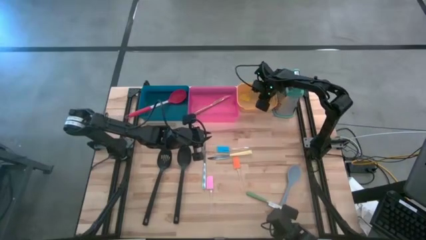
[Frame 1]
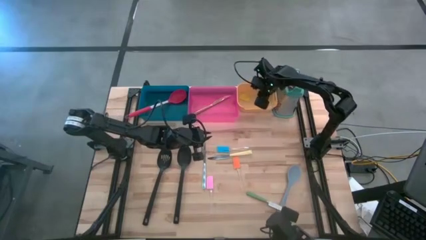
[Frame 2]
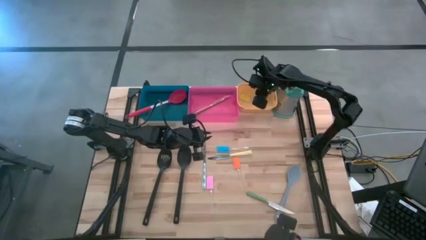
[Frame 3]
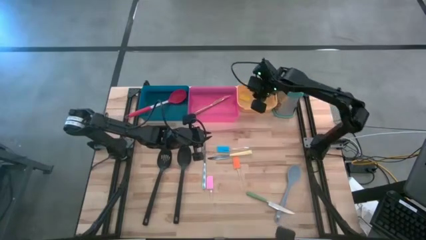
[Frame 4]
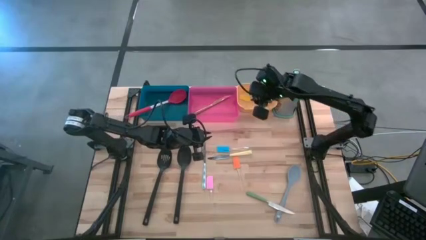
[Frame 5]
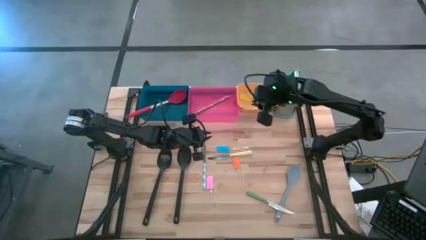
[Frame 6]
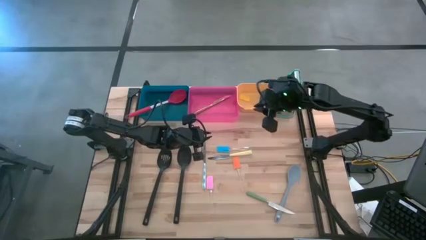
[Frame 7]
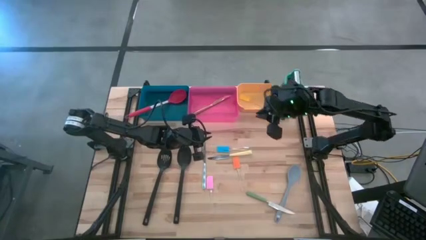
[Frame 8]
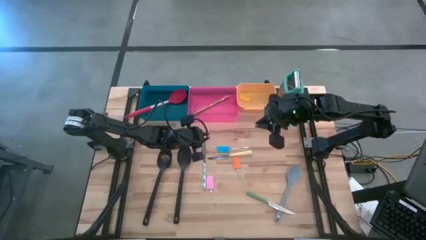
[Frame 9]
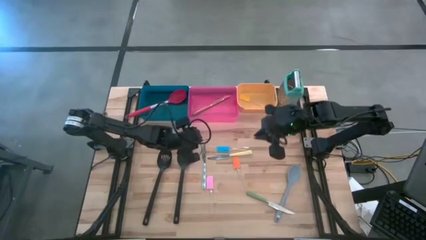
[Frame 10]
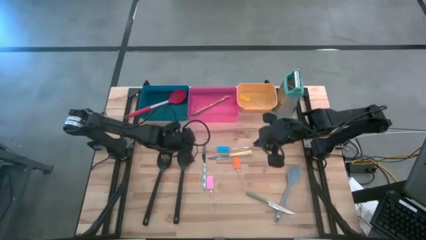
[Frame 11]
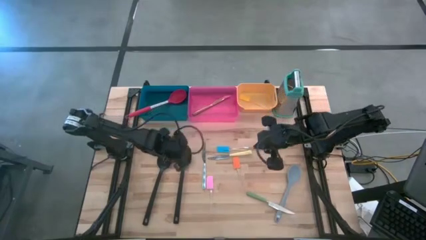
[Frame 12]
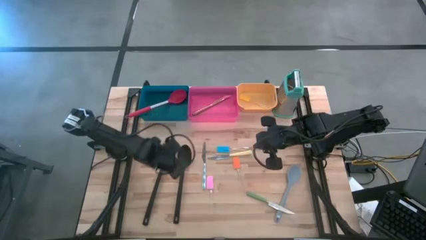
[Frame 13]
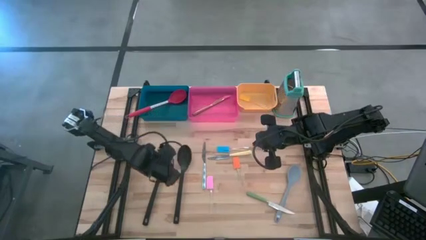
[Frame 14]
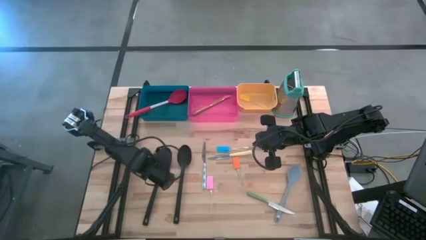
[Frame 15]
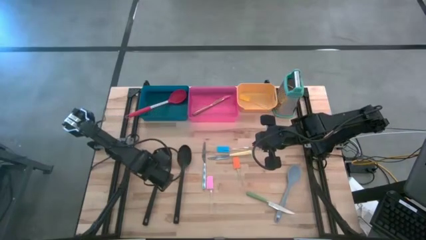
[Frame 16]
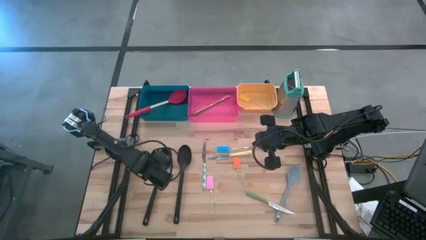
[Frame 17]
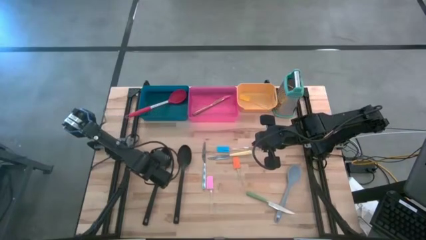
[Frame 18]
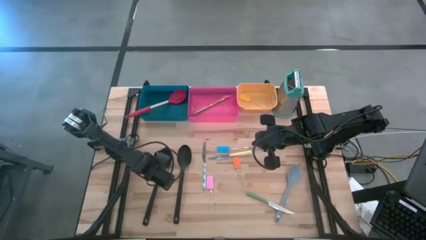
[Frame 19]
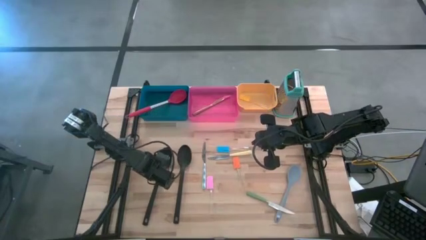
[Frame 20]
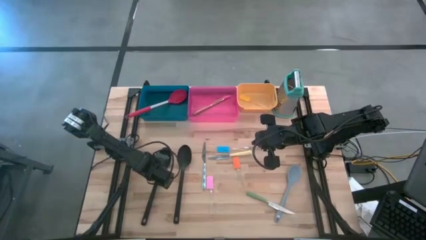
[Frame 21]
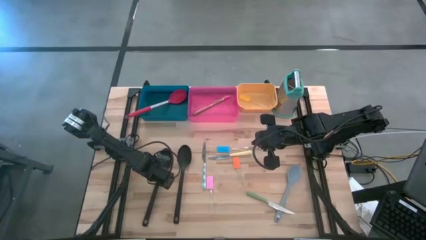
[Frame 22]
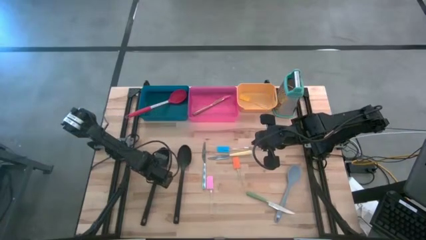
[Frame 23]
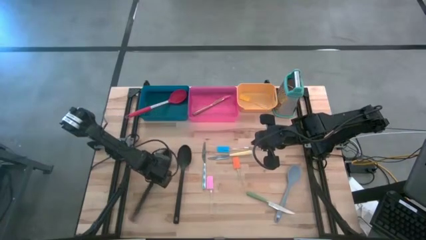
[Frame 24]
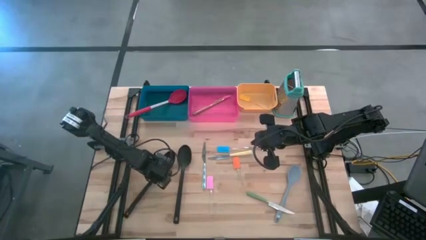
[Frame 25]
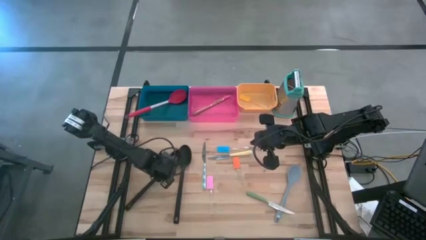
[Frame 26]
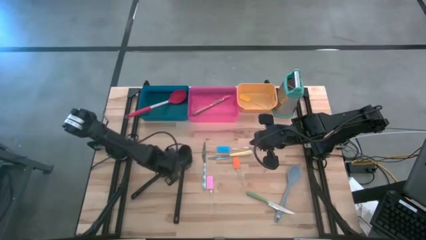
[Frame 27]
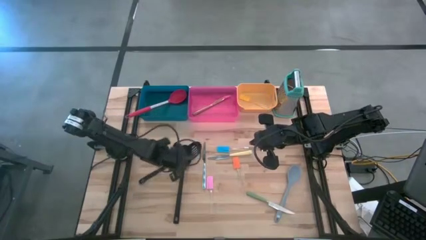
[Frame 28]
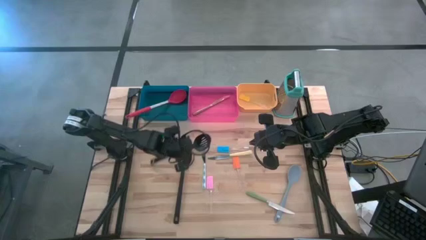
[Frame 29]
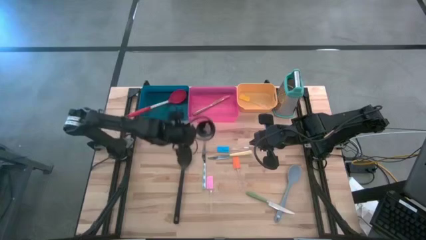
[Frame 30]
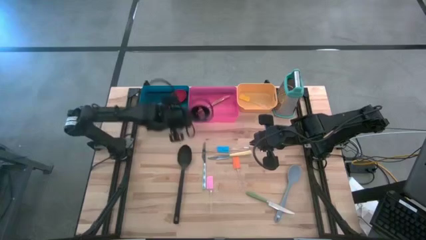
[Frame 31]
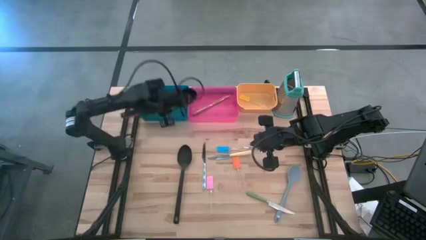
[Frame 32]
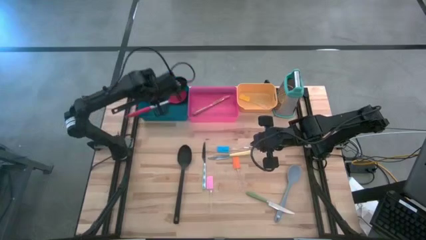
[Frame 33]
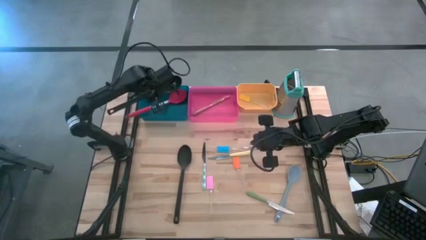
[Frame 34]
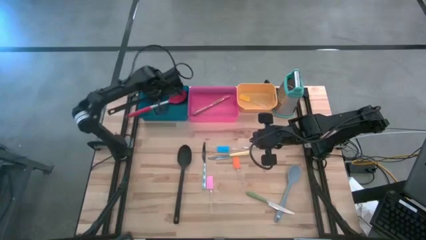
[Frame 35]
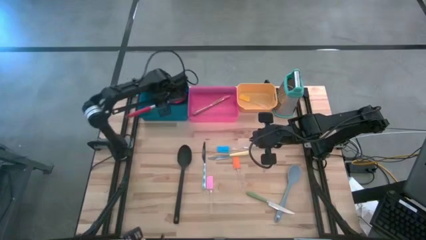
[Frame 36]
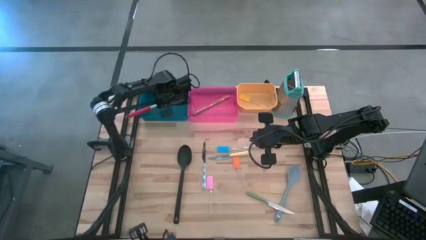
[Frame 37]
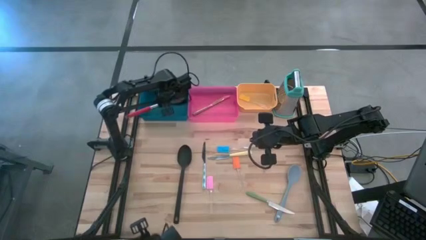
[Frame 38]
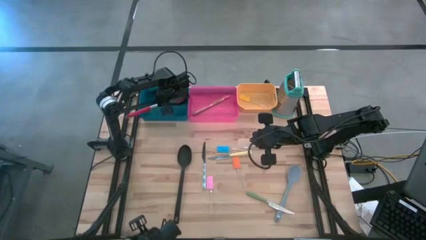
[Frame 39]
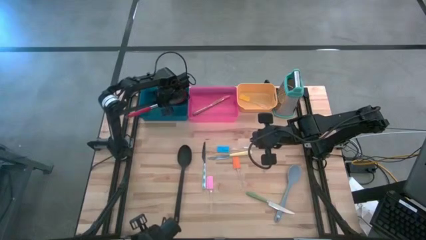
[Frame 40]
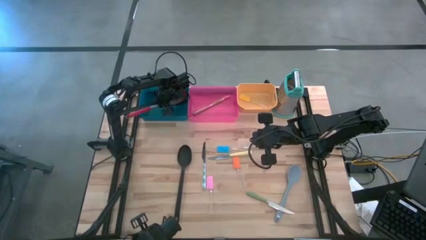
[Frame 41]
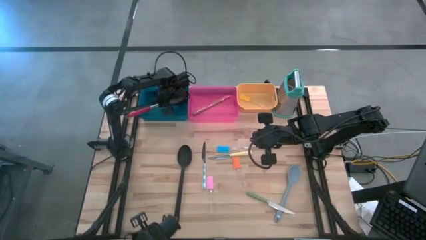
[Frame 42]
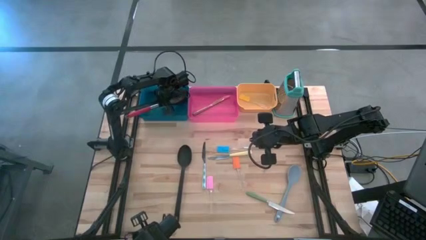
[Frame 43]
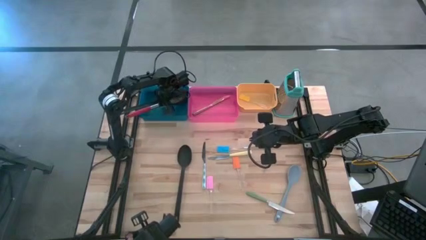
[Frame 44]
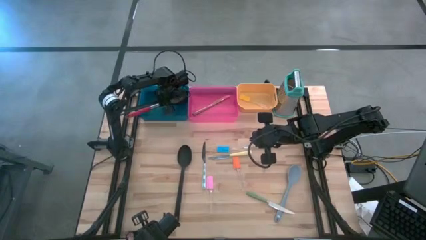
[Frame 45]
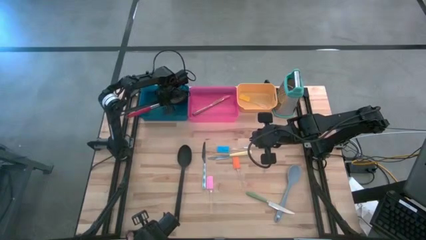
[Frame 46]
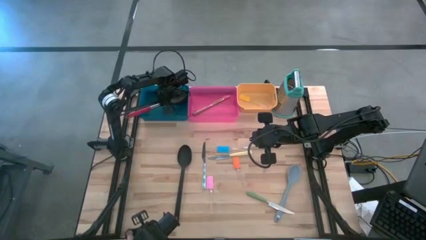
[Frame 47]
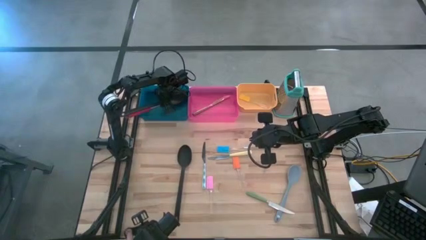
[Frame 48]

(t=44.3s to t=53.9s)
Task: Pick & Place Kitchen Items
Put the left black serving spoon into the blue bin
